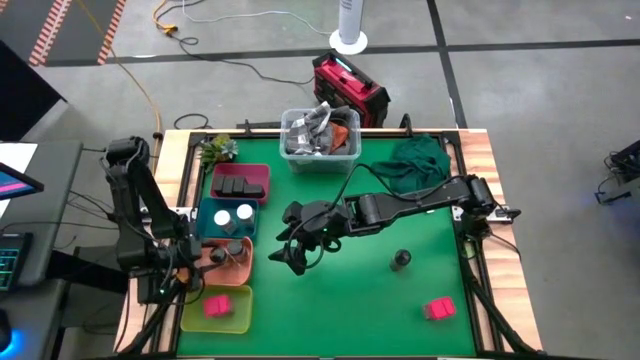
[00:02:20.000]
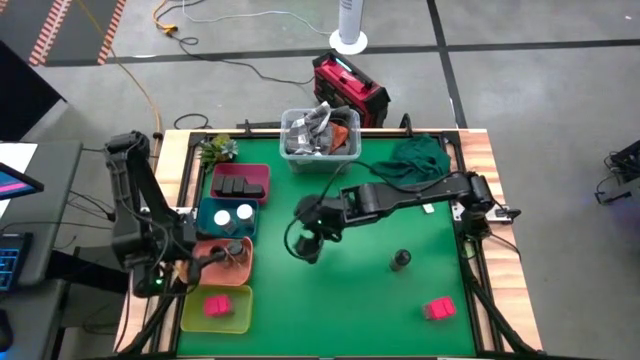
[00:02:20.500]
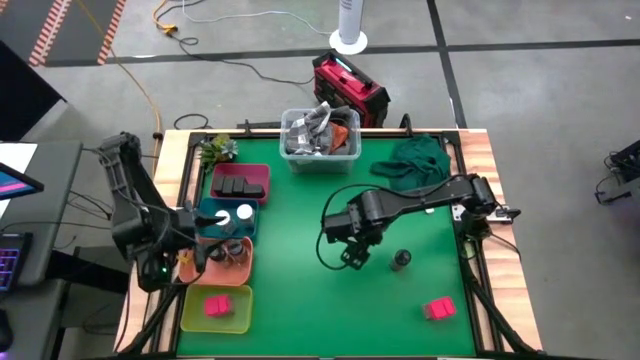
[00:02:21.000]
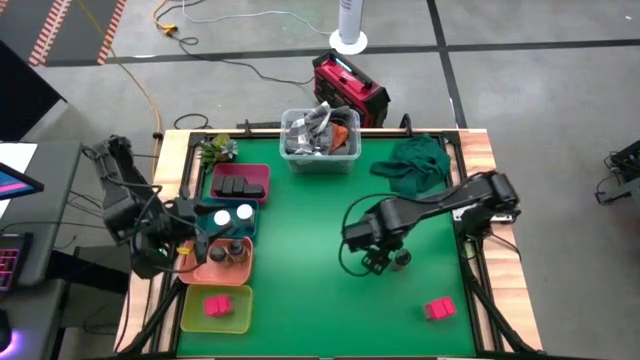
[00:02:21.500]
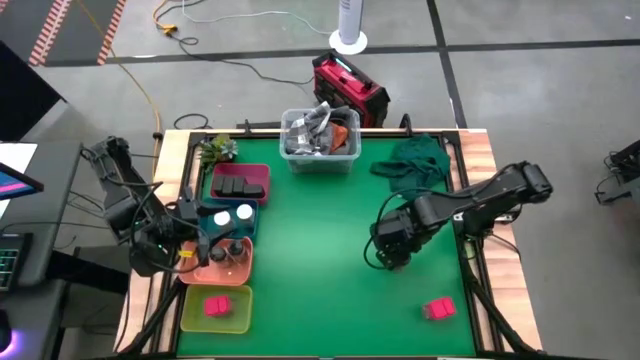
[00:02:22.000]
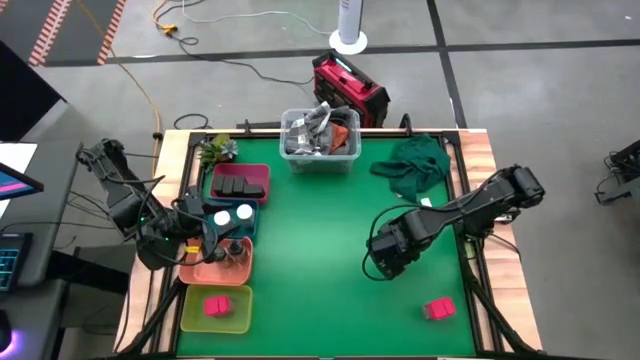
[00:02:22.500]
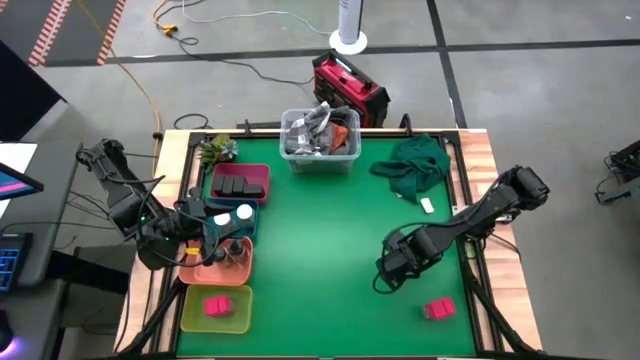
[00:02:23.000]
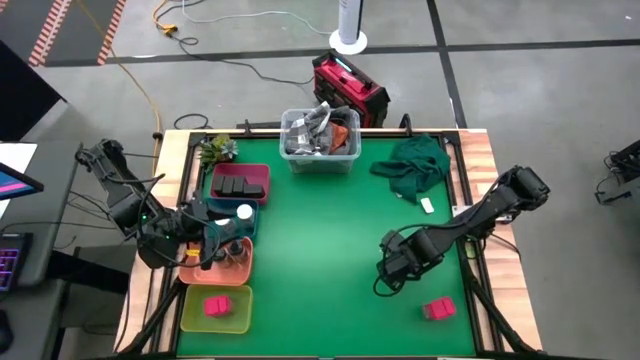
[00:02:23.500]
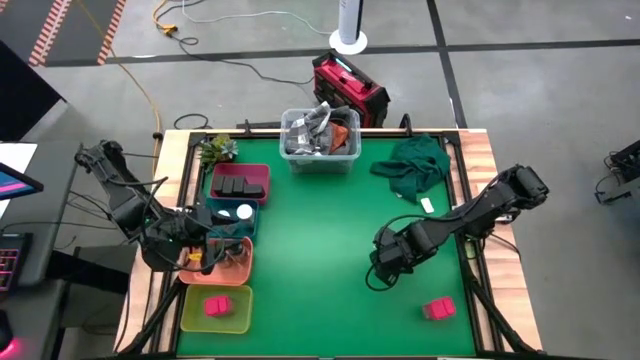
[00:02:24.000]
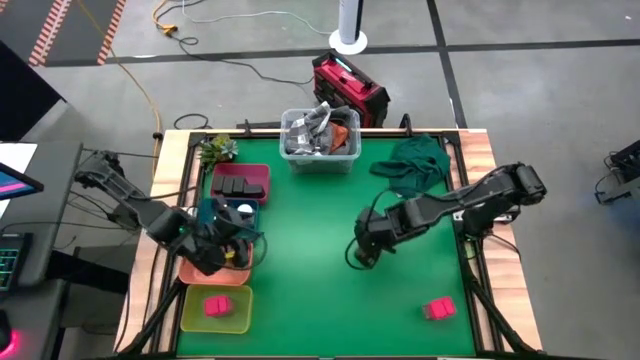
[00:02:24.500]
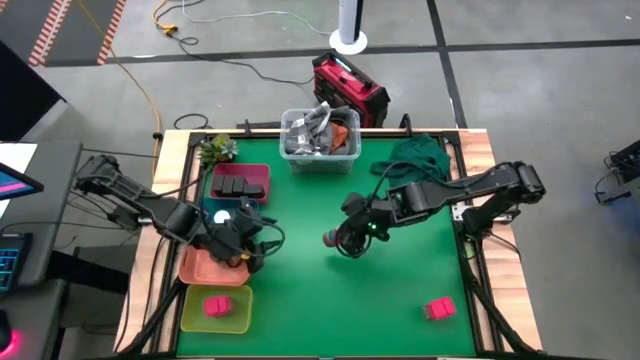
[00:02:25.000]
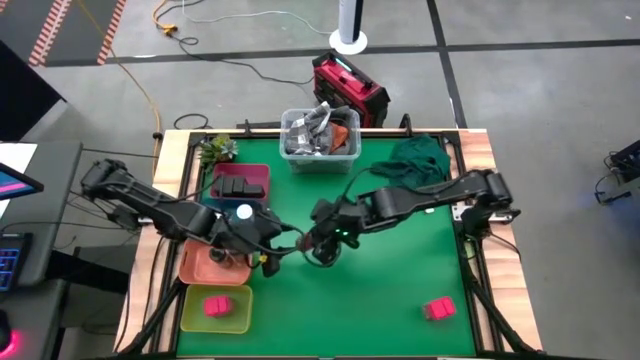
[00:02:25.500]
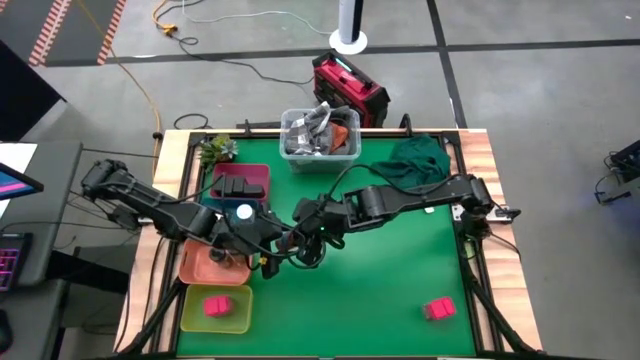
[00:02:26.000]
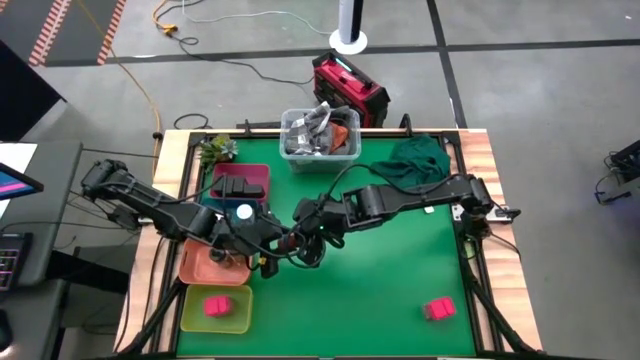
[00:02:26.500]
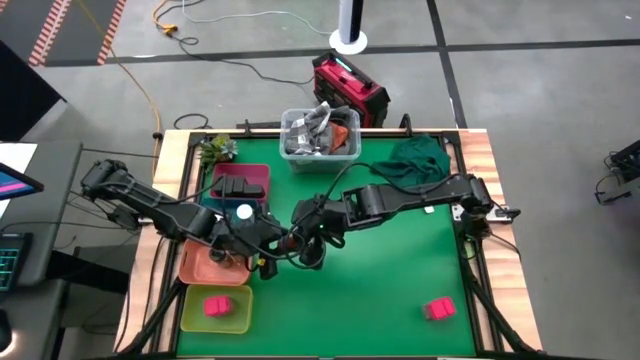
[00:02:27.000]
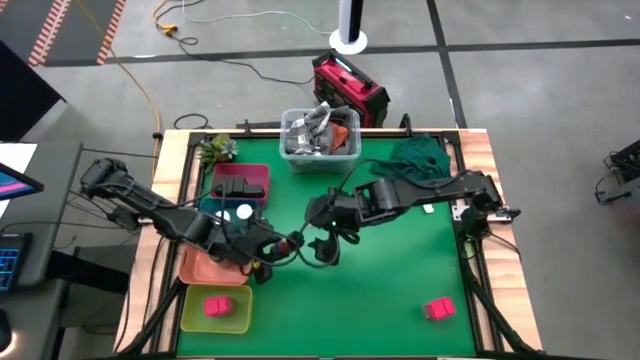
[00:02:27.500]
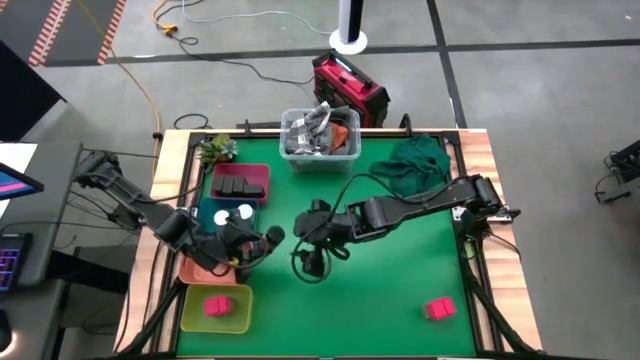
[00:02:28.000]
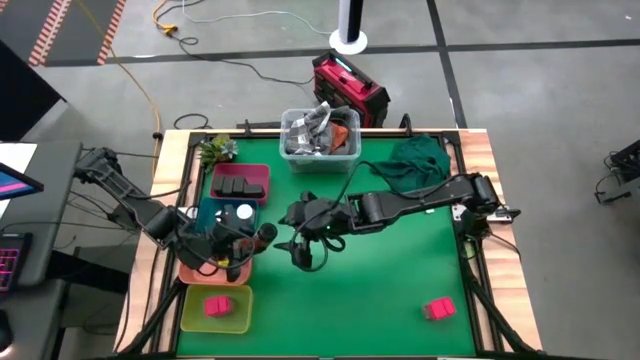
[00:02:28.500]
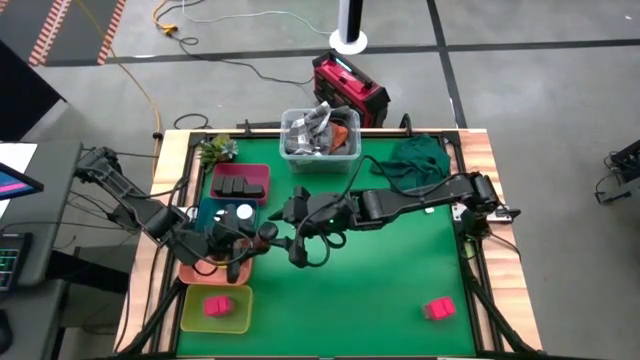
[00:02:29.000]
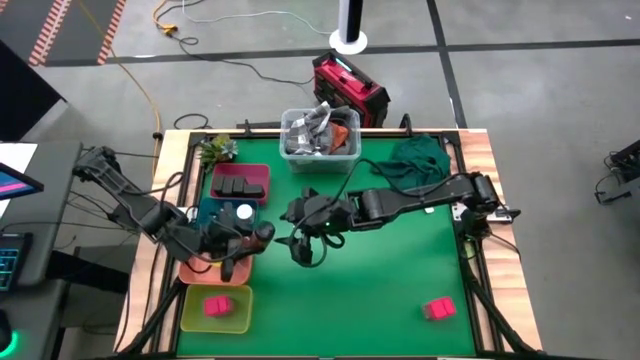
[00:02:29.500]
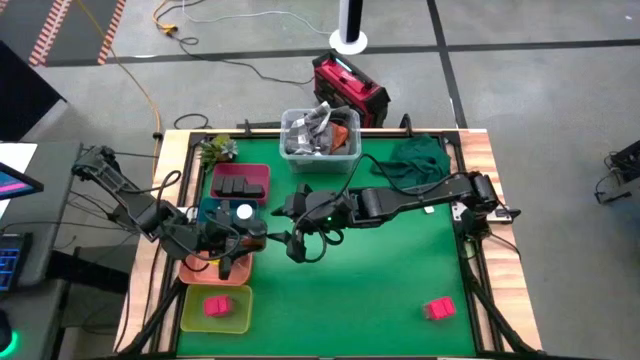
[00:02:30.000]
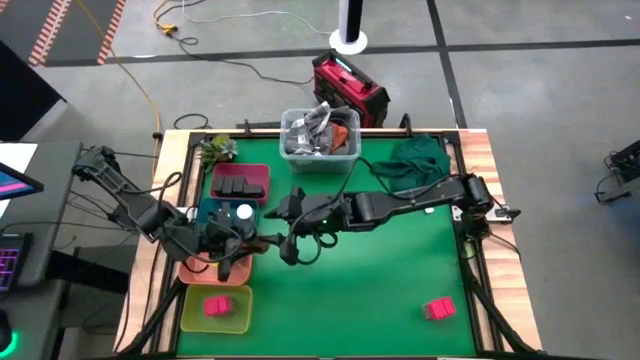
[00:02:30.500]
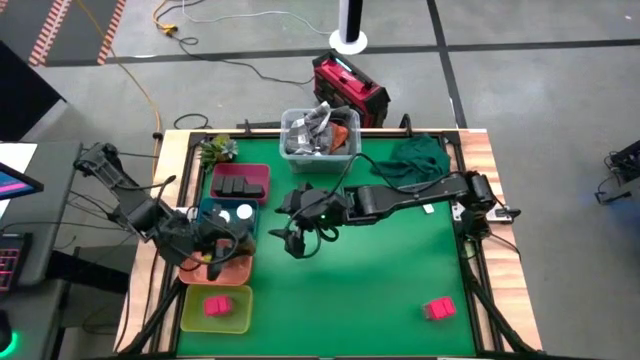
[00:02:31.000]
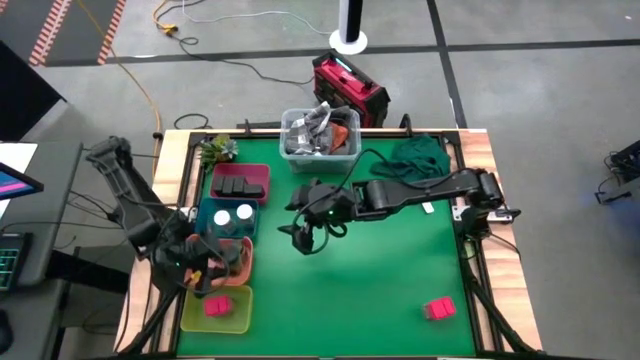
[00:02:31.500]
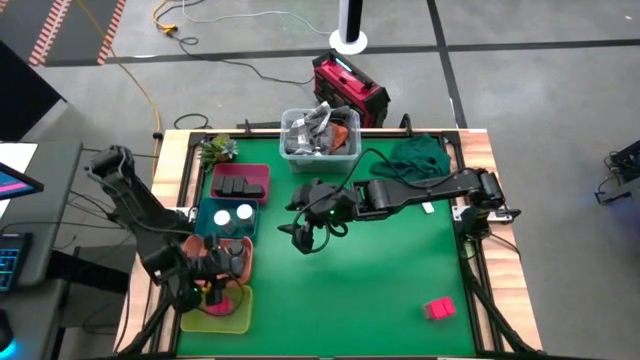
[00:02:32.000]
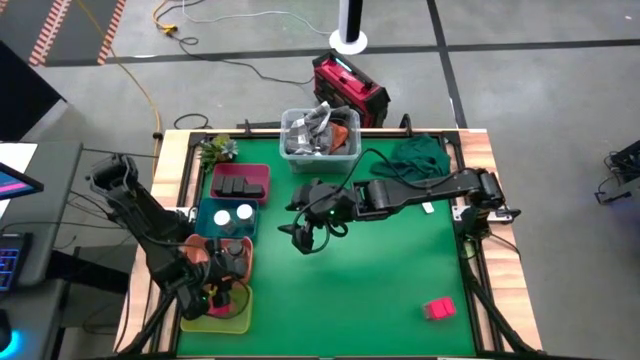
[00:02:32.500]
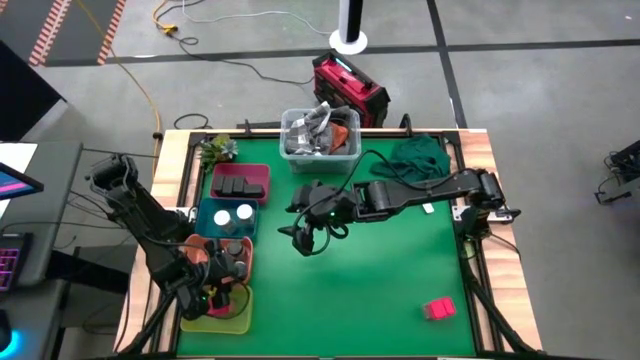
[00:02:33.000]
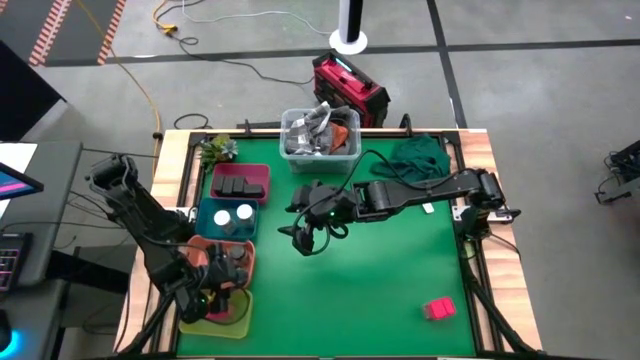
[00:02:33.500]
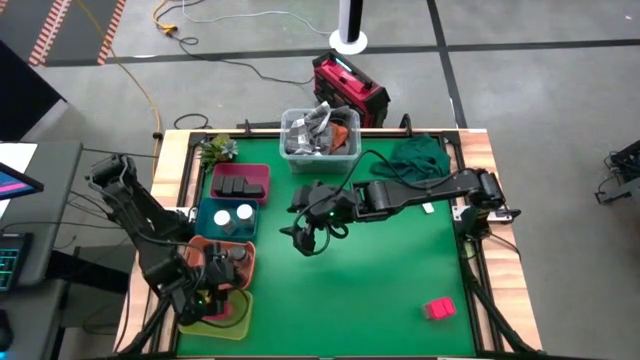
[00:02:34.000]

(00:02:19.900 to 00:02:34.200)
Task: Sort spices by type
Put the black seasoning bottle into the orange bin

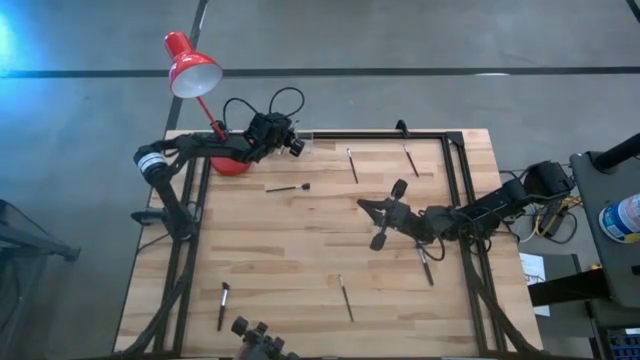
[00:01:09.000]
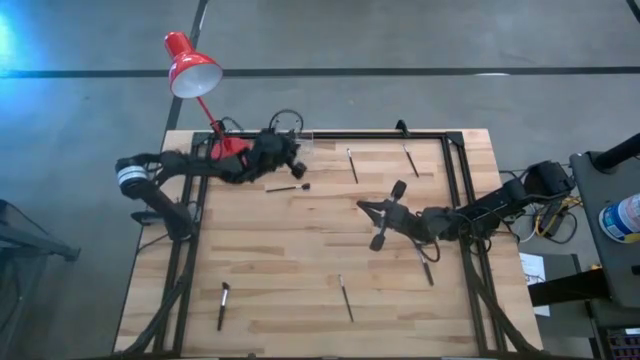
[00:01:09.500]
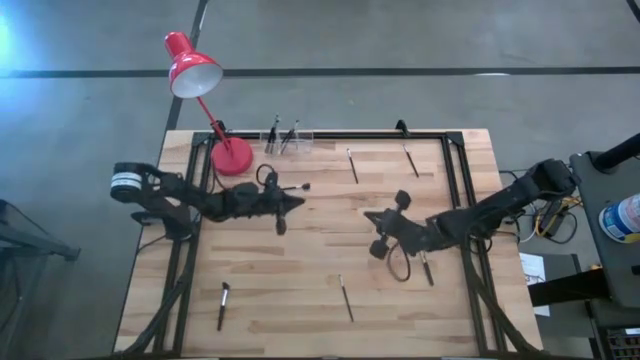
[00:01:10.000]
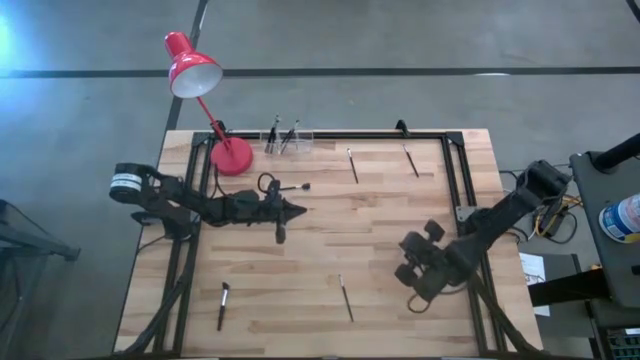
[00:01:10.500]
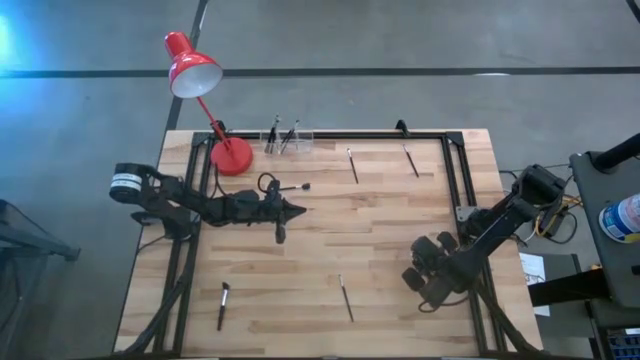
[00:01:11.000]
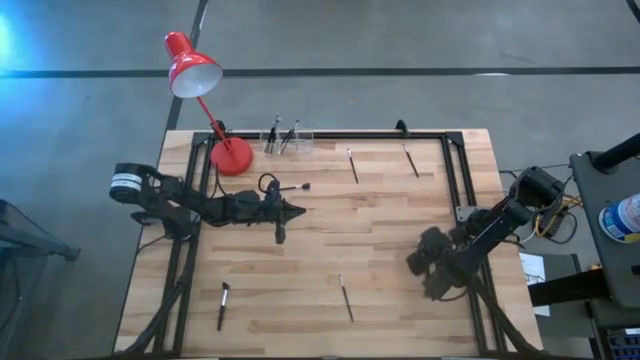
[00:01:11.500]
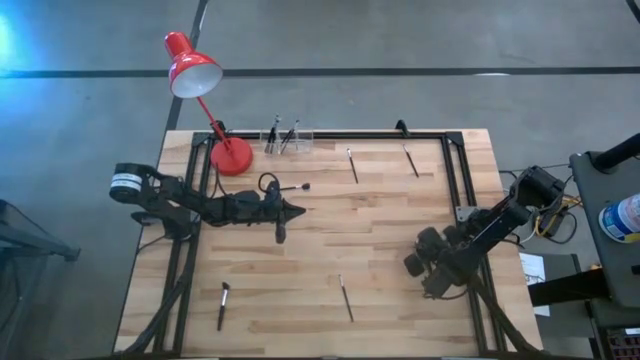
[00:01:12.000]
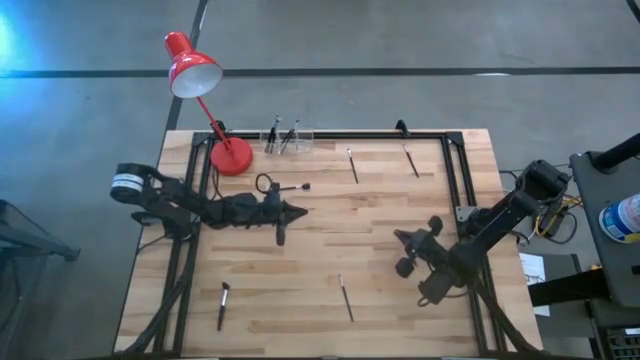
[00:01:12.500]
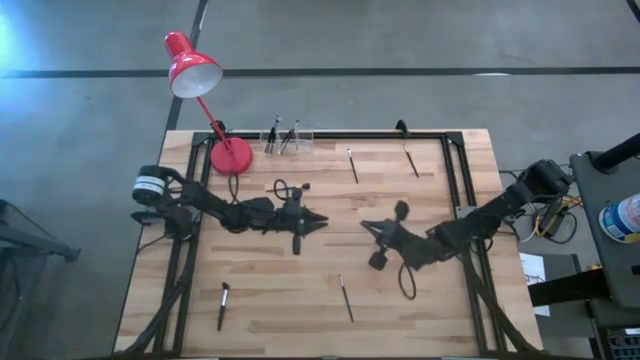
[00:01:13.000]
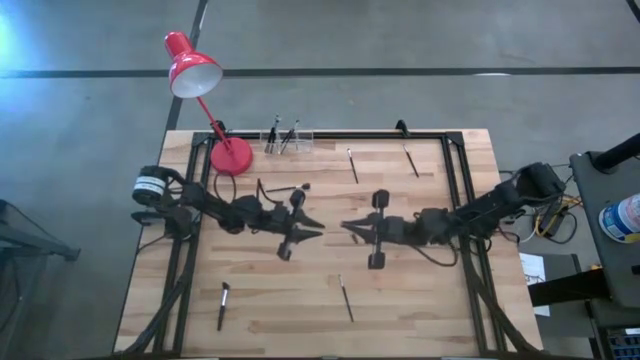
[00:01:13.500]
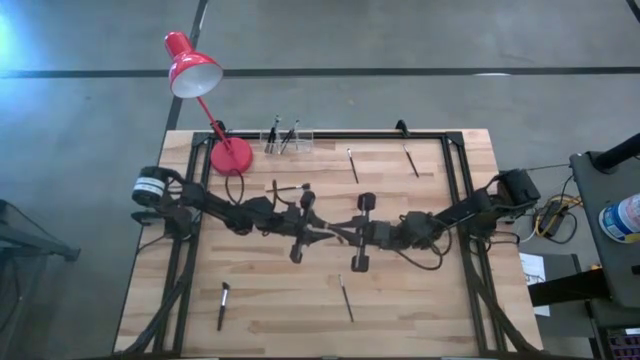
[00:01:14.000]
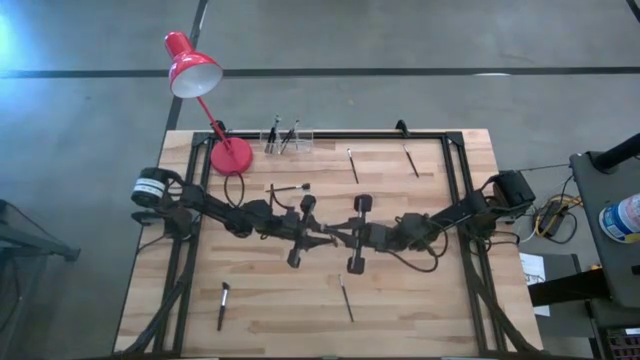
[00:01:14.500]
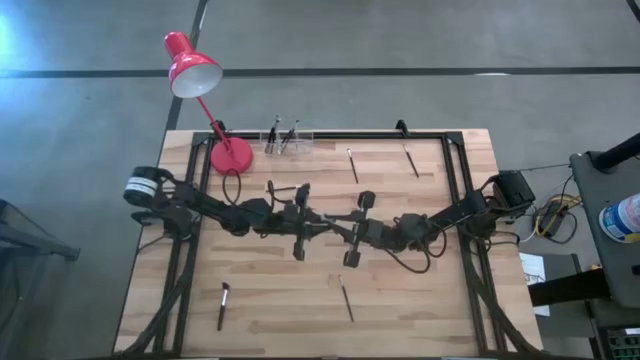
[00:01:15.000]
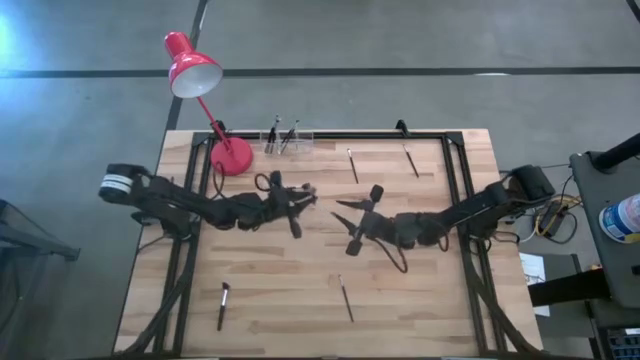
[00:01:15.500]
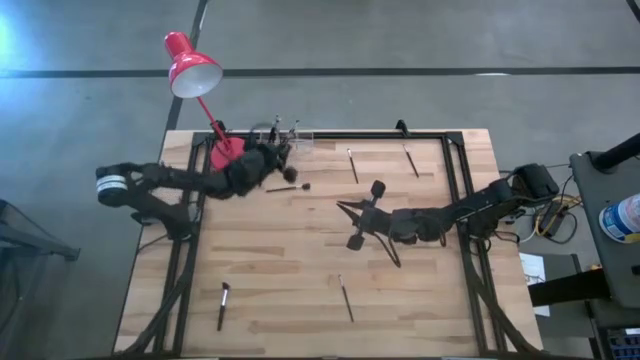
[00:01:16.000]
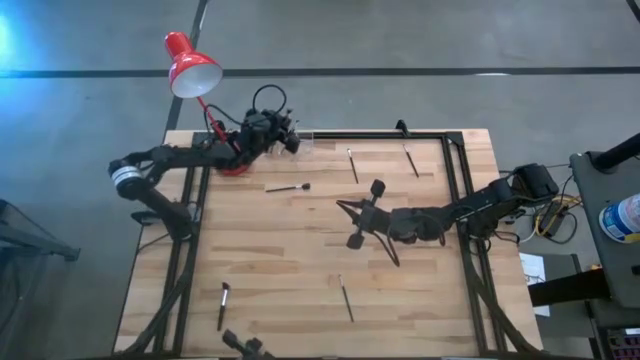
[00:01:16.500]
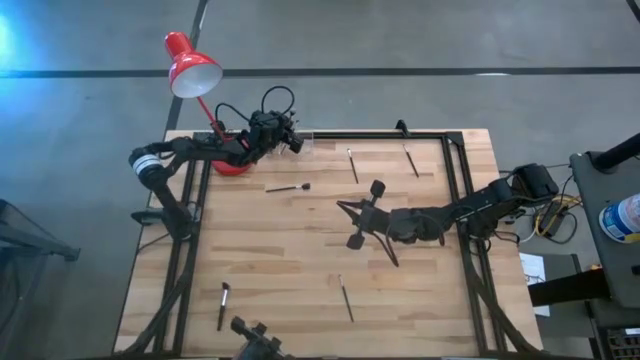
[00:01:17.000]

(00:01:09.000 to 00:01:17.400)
Task: Pick & Place Makeup Supplies
Put the makeup brush into the transparent organizer
